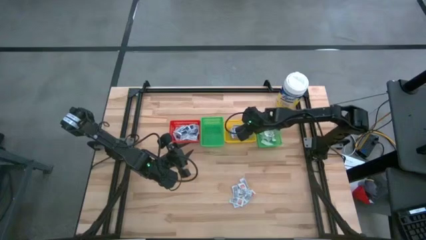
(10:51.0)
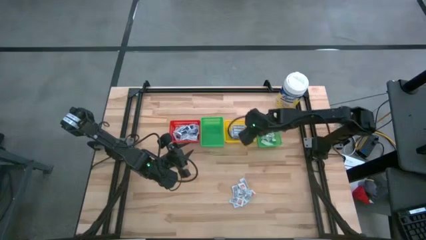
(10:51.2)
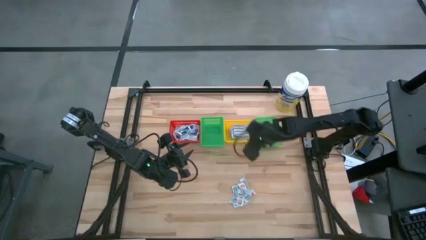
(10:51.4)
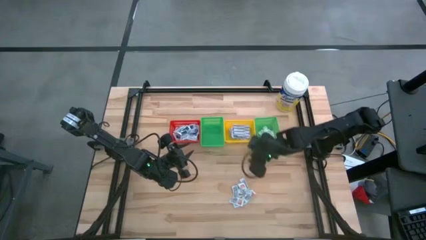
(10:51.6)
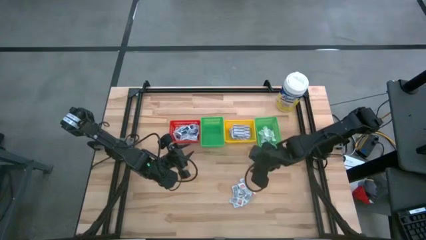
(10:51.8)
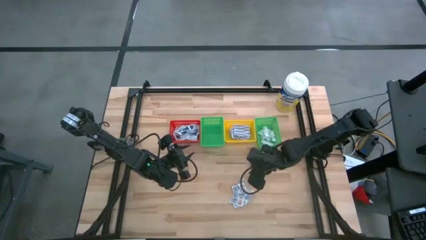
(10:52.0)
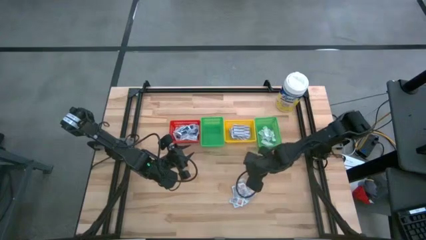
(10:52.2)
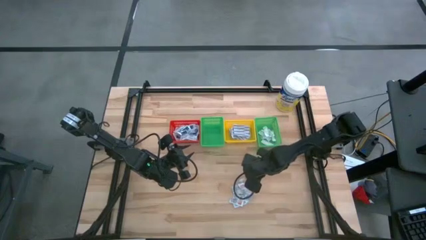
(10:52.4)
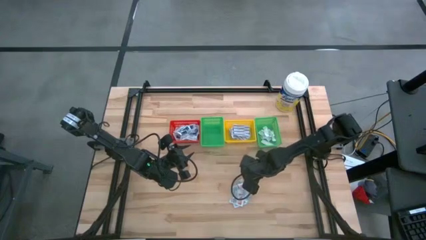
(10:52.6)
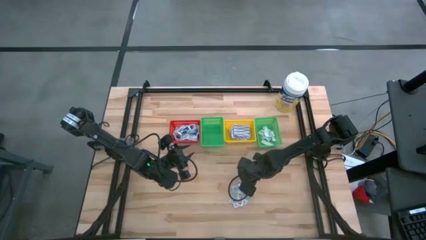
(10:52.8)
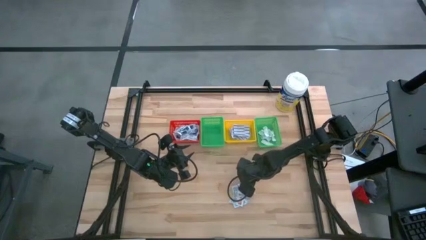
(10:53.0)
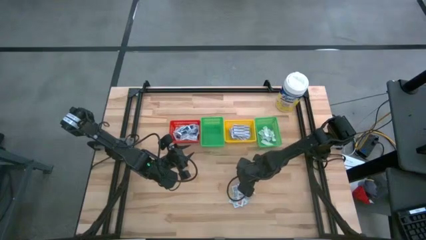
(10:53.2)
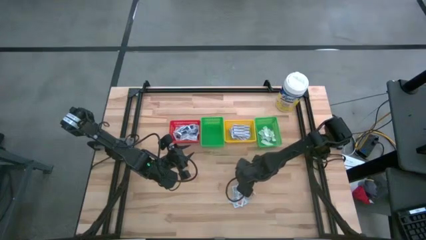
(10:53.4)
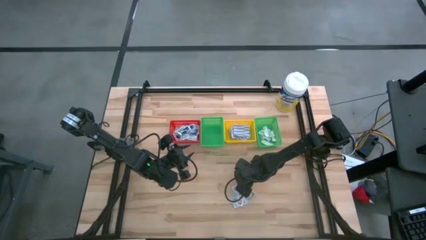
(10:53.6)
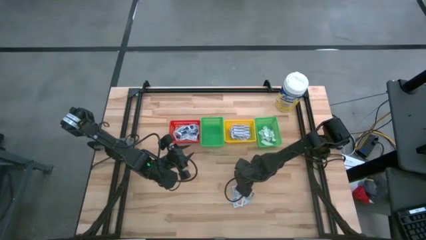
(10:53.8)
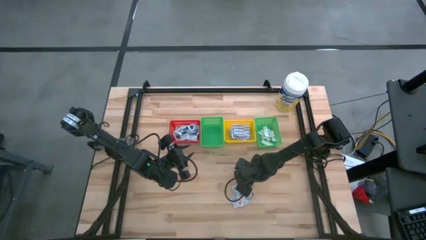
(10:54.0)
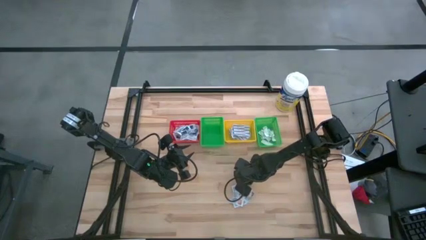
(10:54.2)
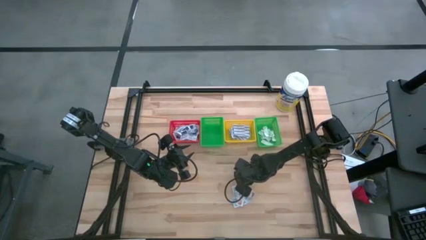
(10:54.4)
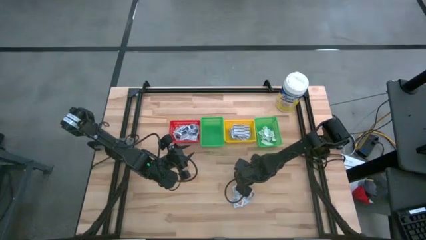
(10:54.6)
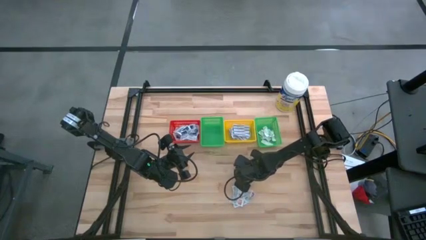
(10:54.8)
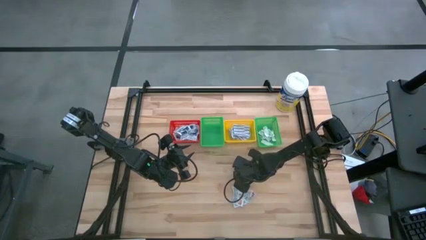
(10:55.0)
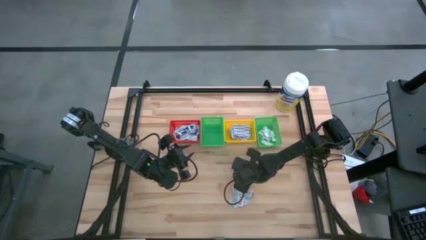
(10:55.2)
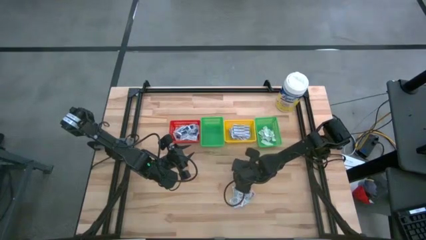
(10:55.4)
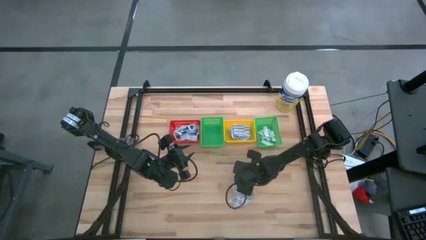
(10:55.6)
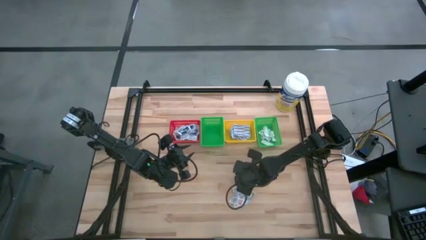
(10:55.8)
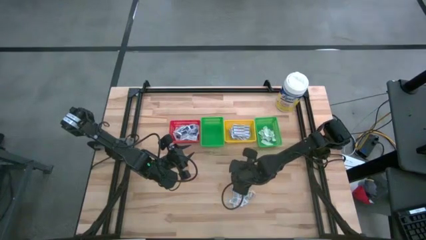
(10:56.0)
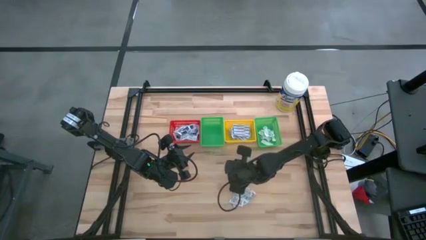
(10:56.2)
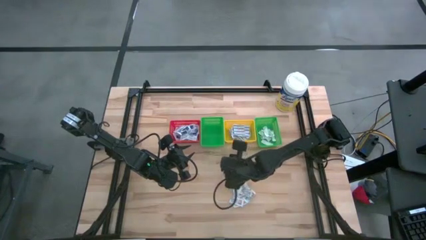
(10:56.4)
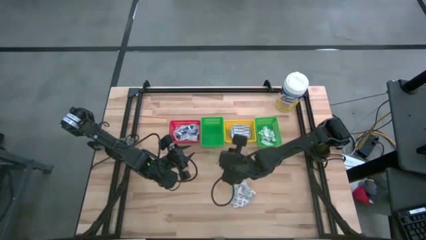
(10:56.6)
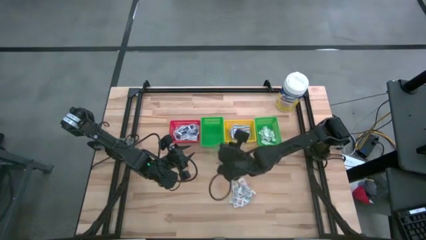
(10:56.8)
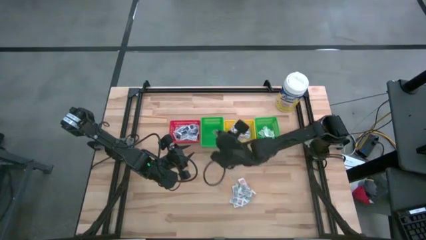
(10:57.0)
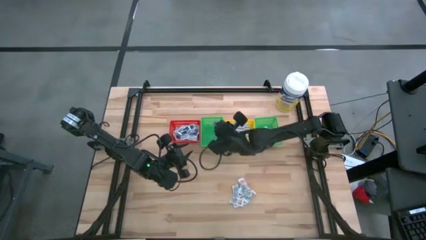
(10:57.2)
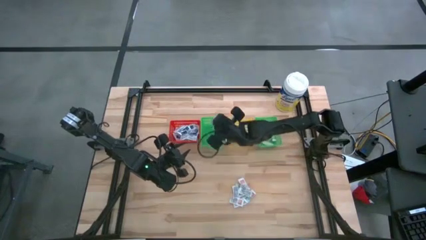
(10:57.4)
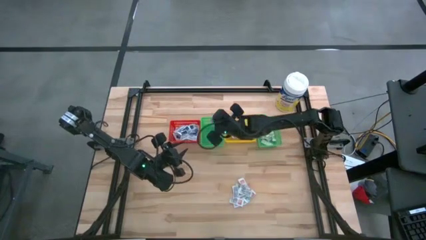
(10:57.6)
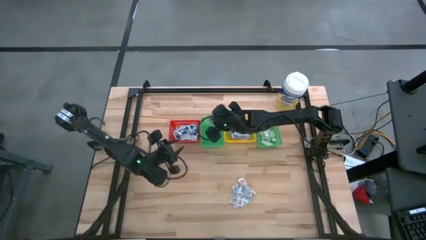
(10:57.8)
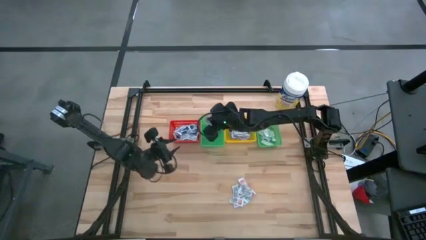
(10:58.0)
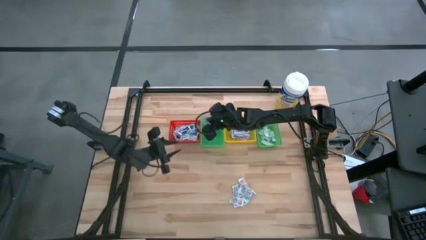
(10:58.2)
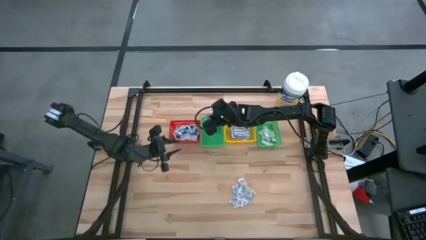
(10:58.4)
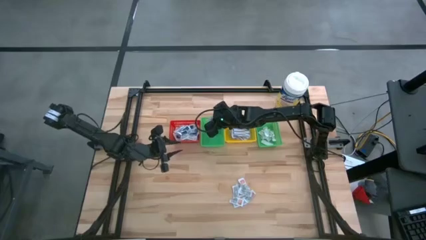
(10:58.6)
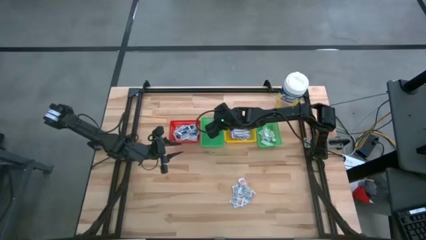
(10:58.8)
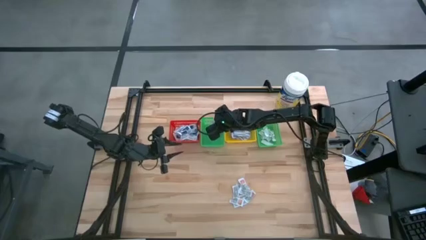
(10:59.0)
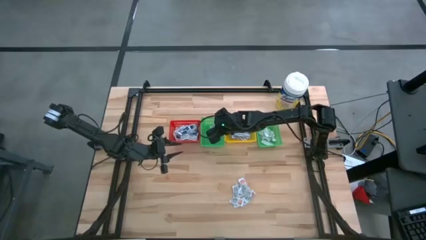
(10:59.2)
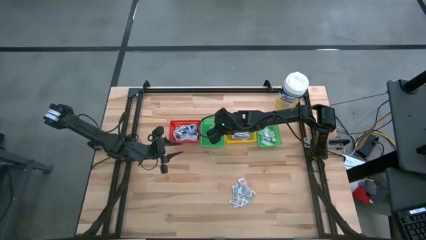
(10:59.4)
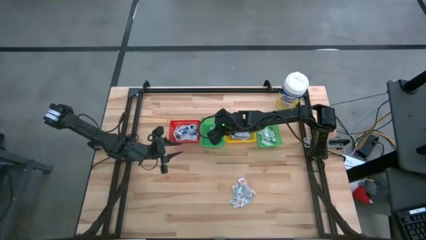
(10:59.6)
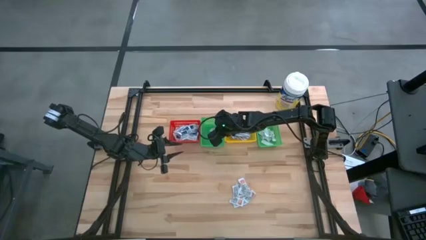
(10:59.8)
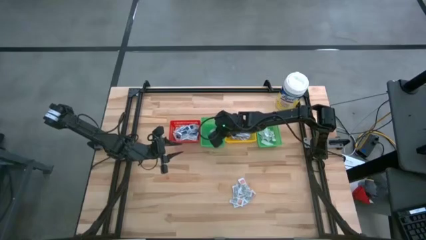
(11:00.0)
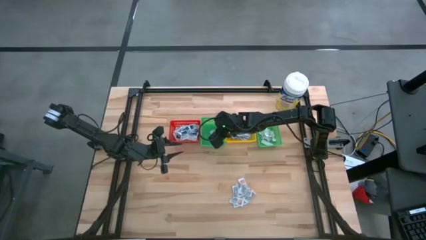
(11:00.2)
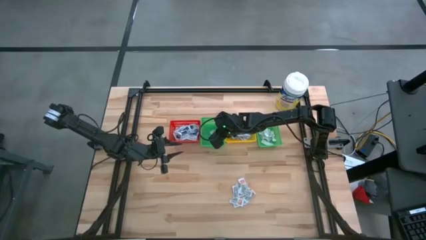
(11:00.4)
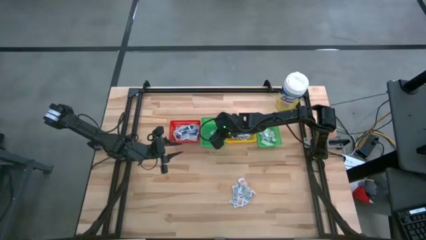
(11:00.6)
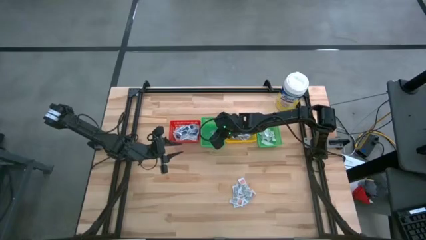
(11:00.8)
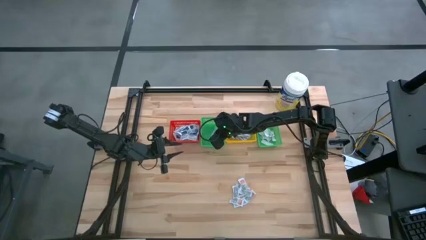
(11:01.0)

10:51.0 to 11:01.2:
Task: Pick & Place First Aid Supplies
Put the ointment pack into the left green basket

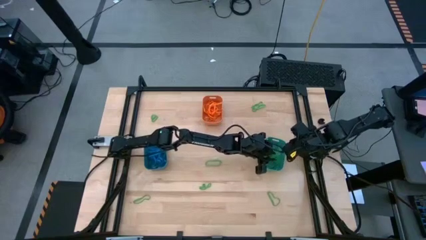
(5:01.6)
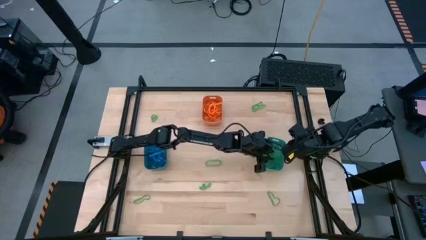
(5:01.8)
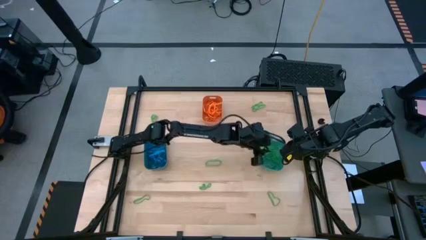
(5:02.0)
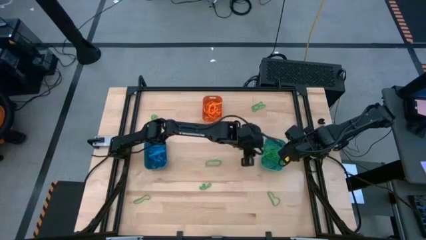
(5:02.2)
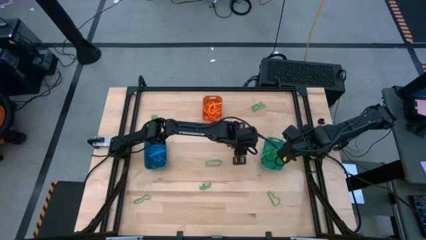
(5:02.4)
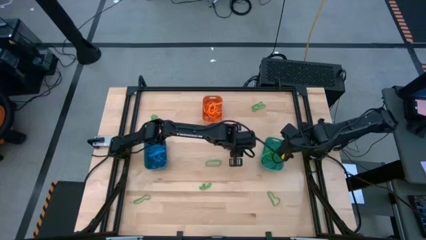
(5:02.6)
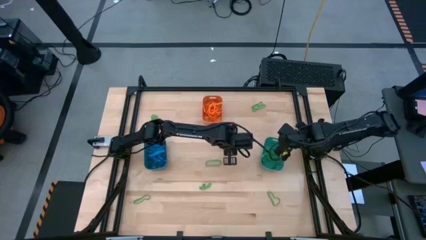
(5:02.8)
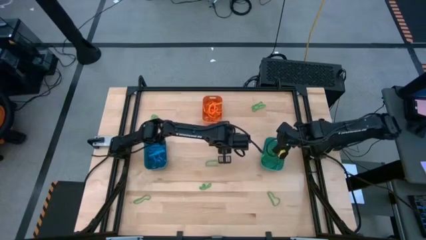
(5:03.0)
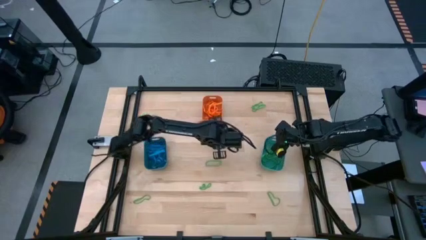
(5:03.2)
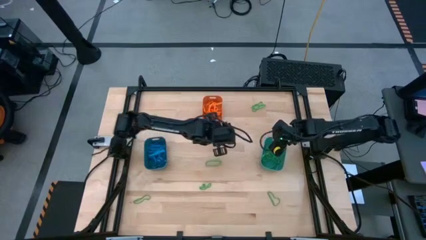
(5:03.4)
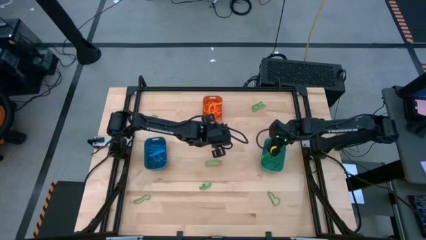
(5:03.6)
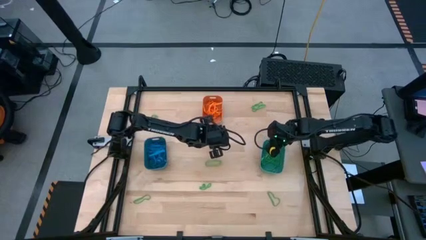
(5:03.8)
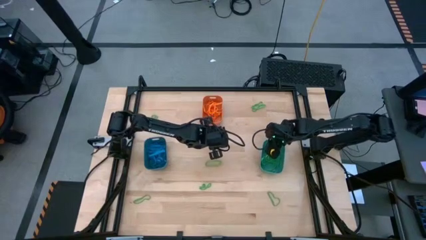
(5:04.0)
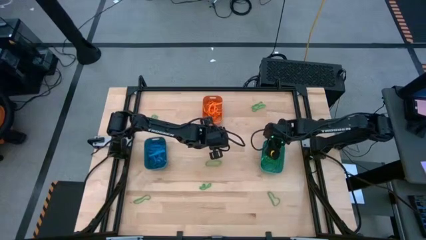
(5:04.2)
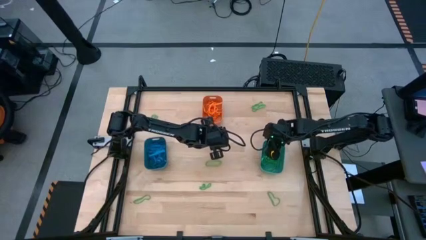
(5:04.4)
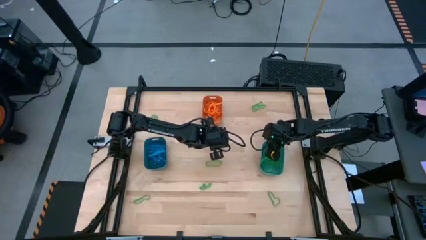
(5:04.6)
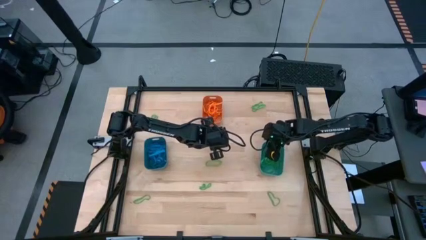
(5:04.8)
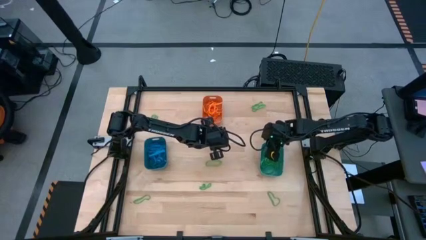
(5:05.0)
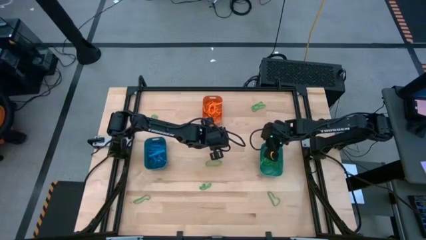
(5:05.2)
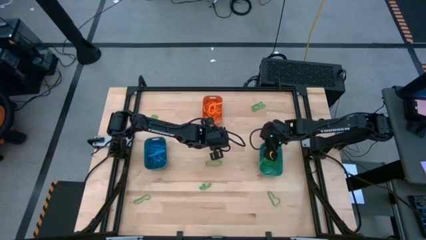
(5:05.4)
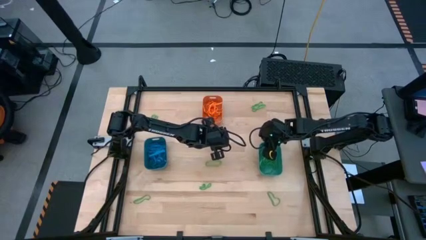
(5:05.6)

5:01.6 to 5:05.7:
Task: Sort rubber bands into baskets
Adjust the green bin
